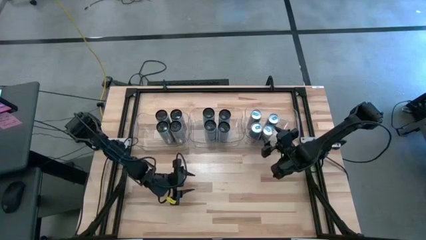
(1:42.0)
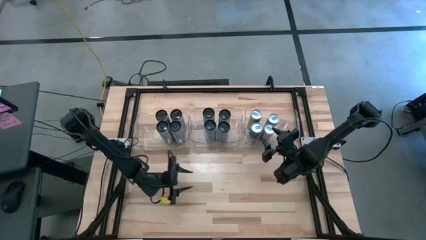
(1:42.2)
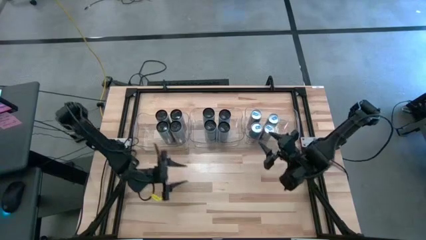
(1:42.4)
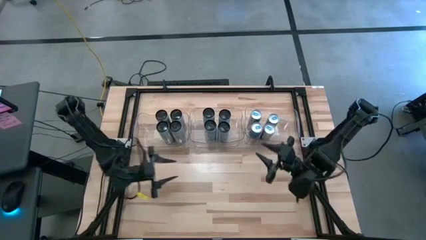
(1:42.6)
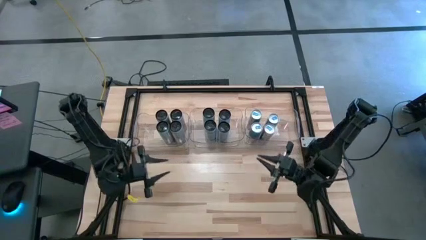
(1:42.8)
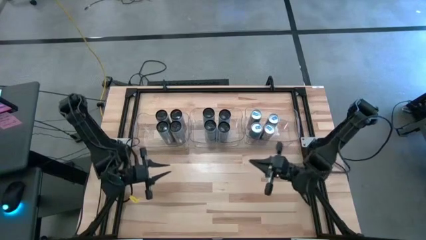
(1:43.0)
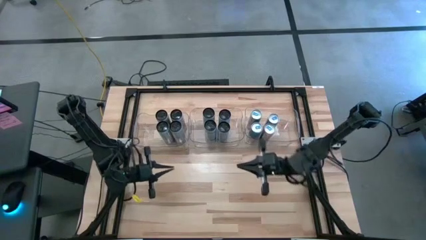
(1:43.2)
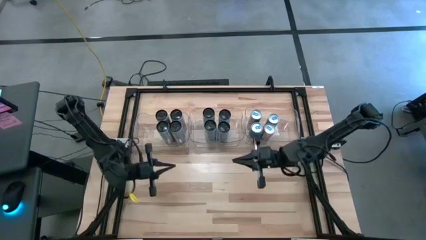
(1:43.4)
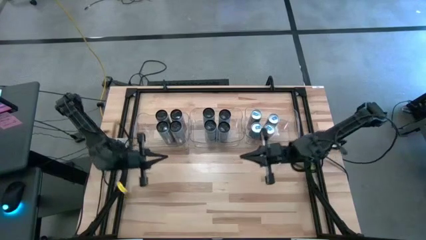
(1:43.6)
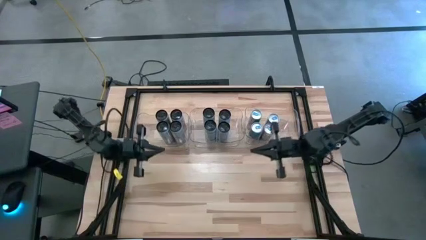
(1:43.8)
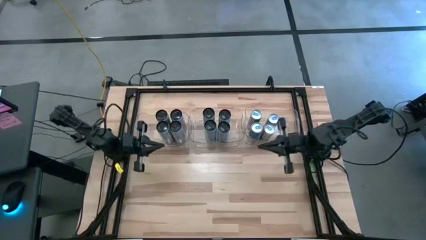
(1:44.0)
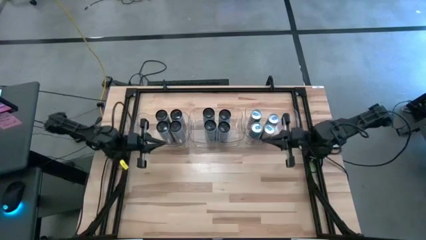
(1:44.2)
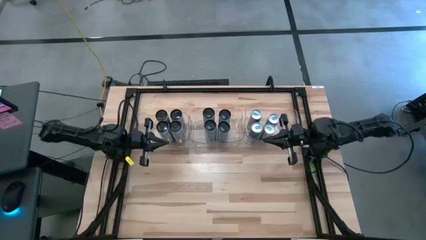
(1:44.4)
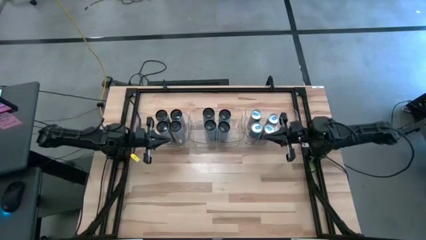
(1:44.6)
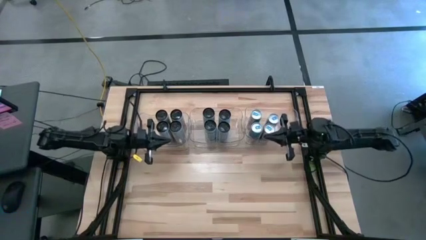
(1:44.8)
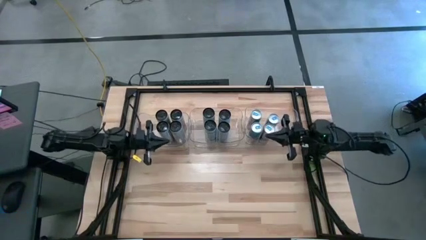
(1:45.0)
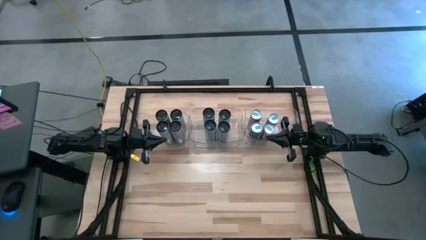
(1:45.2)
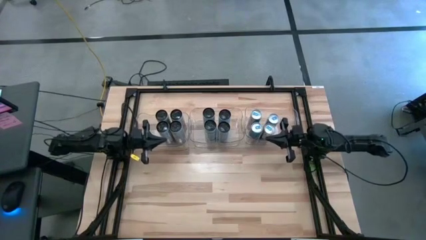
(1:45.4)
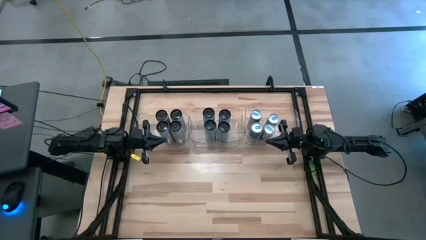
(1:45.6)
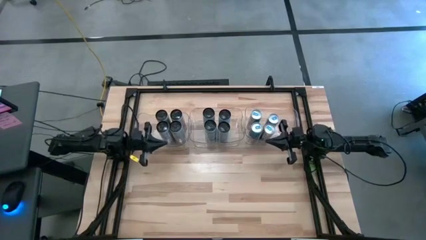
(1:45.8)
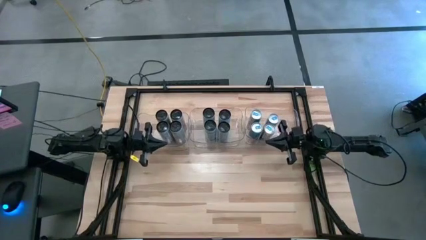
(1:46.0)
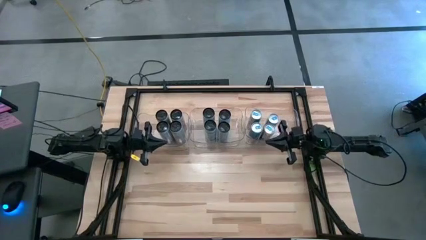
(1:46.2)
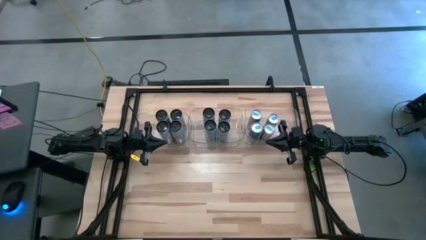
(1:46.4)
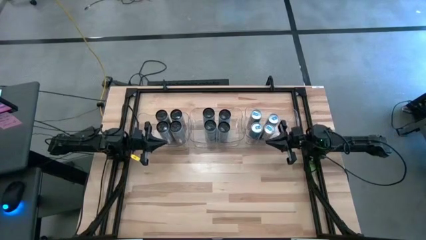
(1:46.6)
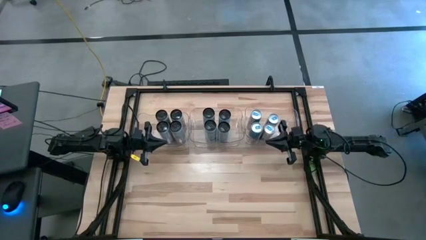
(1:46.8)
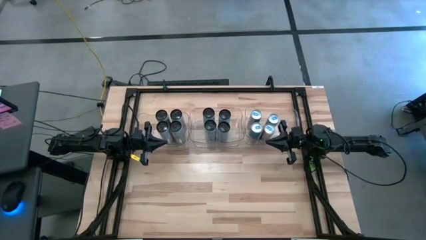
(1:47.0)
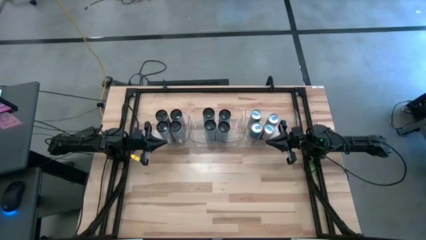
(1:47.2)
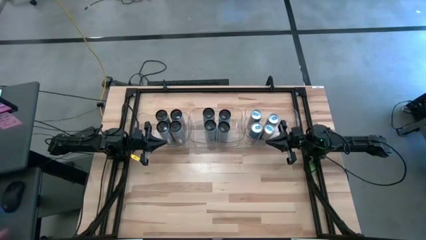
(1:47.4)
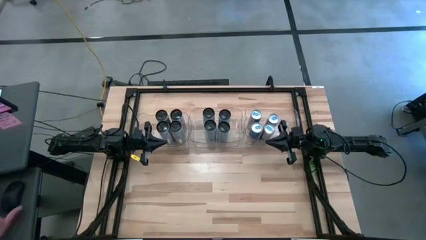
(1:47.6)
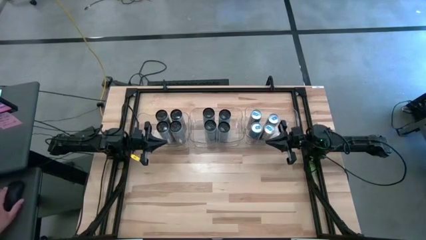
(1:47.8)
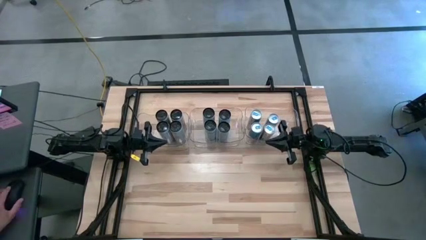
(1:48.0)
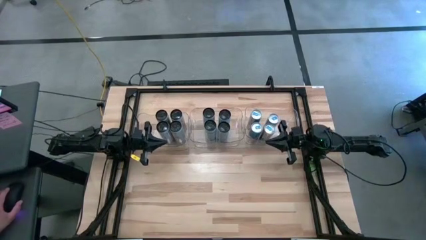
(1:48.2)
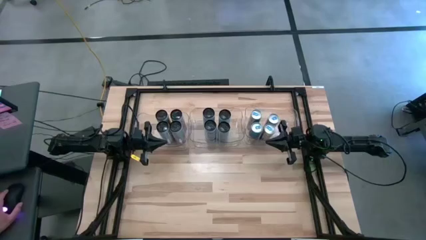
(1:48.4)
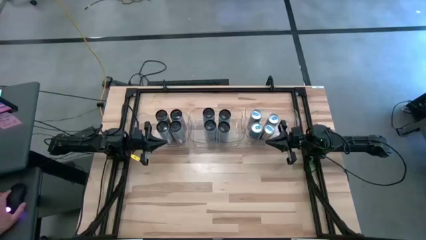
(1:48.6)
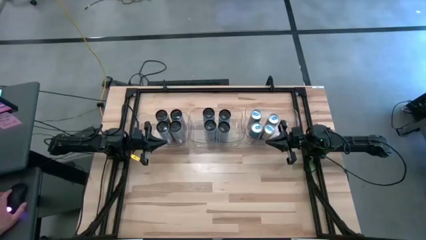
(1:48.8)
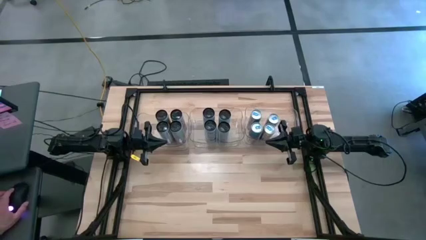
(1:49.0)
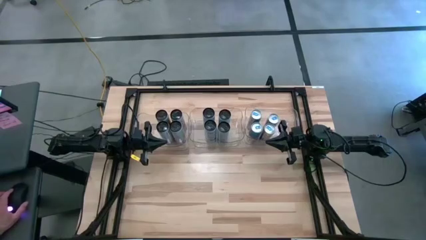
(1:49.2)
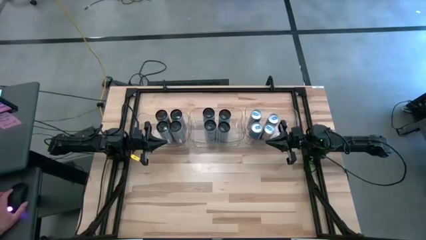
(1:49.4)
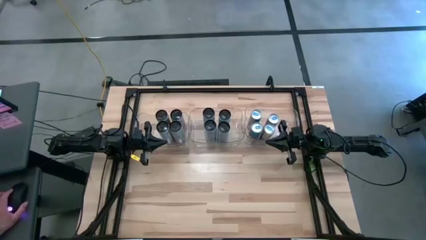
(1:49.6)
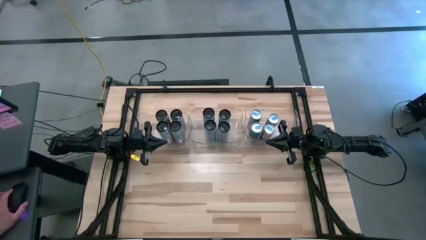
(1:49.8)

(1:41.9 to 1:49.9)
Task: Sort soda cans
Return to Home Position

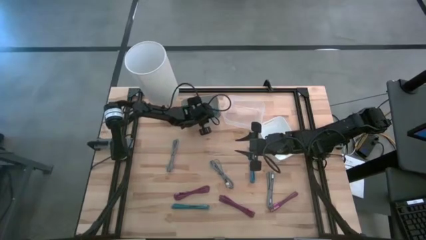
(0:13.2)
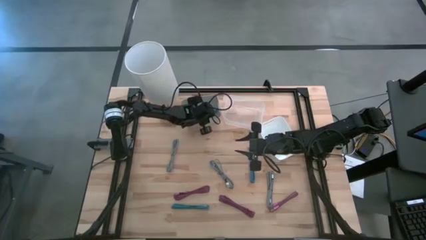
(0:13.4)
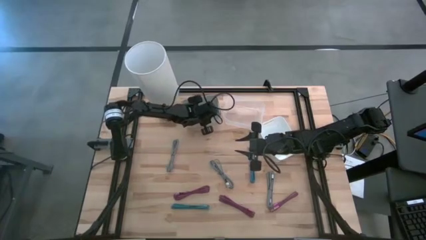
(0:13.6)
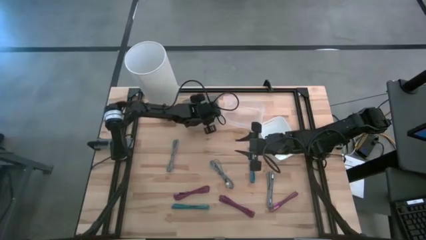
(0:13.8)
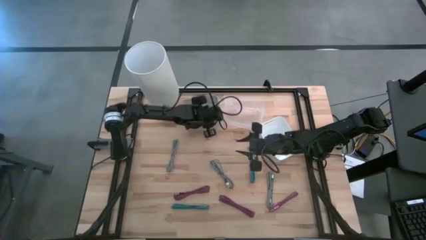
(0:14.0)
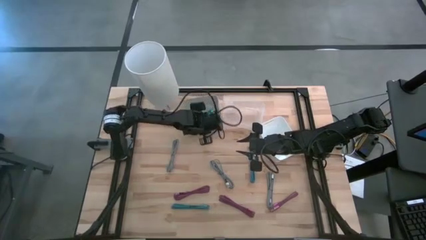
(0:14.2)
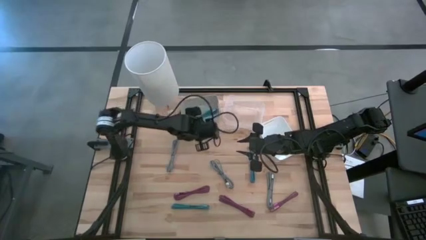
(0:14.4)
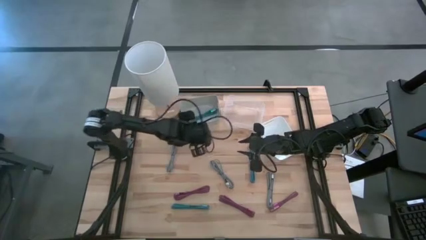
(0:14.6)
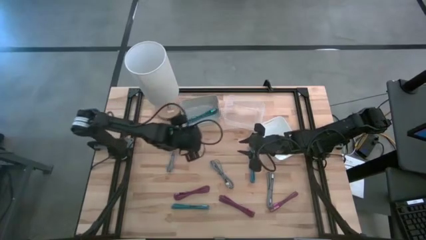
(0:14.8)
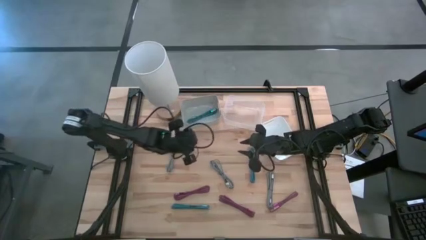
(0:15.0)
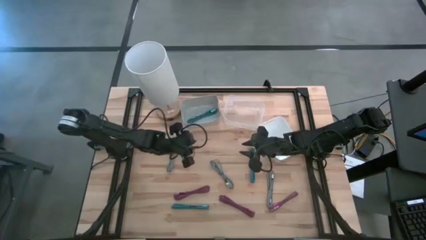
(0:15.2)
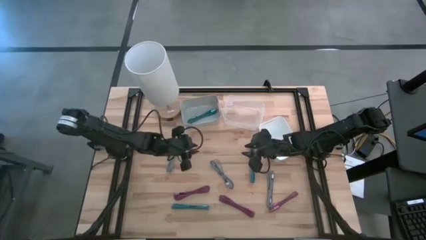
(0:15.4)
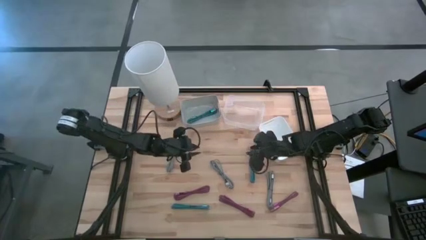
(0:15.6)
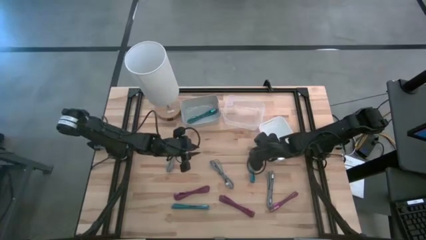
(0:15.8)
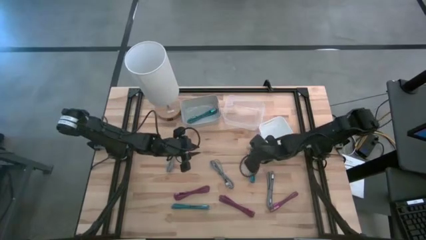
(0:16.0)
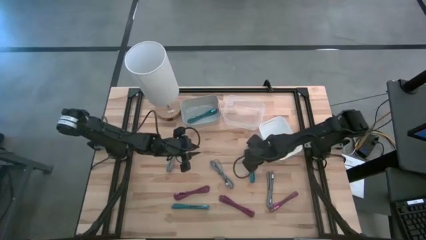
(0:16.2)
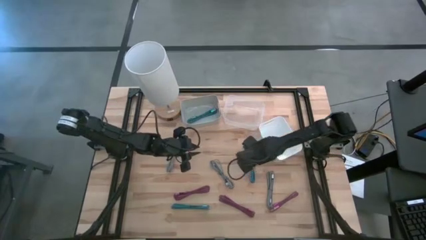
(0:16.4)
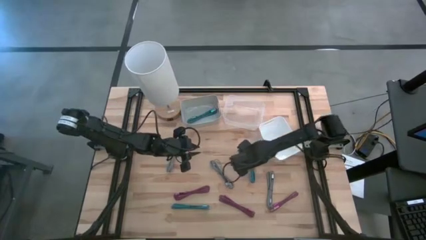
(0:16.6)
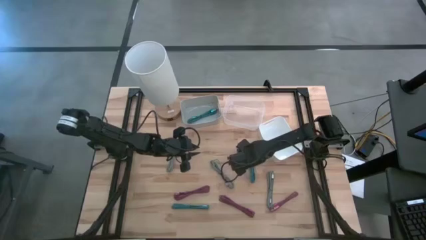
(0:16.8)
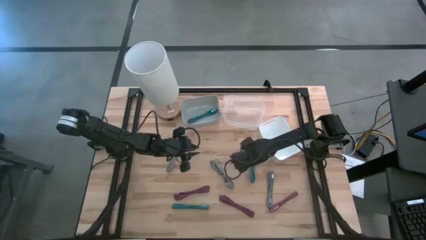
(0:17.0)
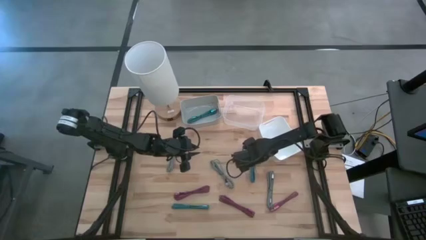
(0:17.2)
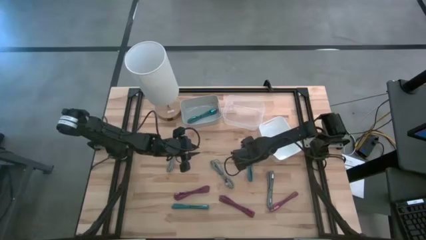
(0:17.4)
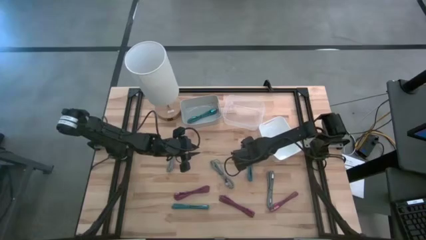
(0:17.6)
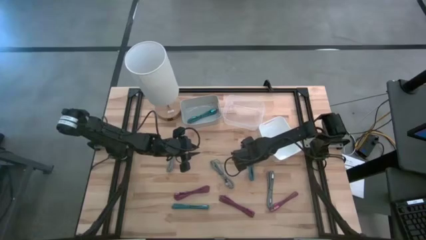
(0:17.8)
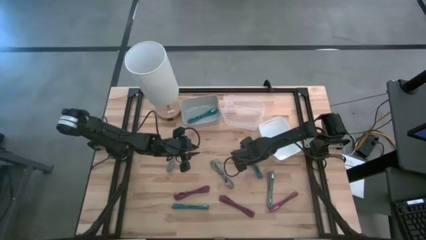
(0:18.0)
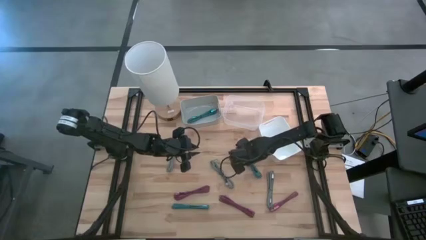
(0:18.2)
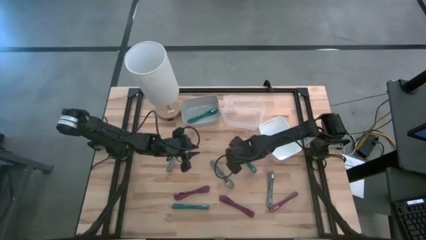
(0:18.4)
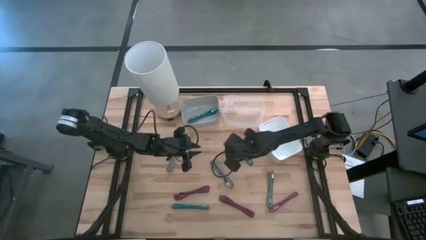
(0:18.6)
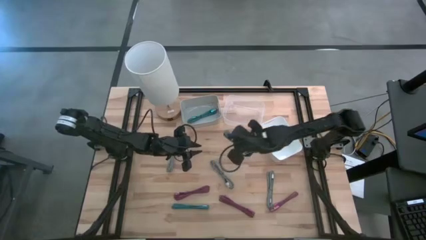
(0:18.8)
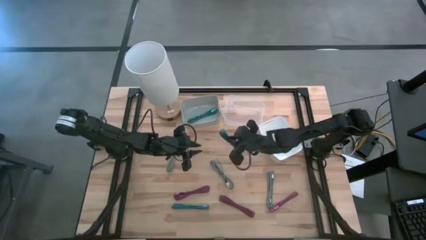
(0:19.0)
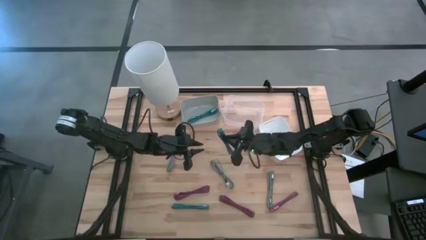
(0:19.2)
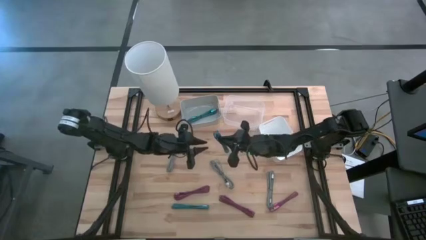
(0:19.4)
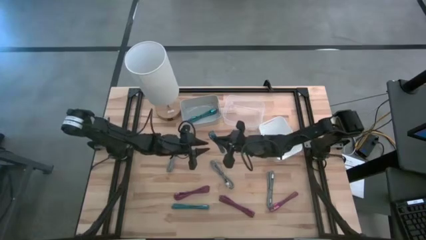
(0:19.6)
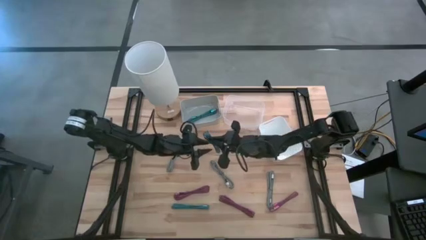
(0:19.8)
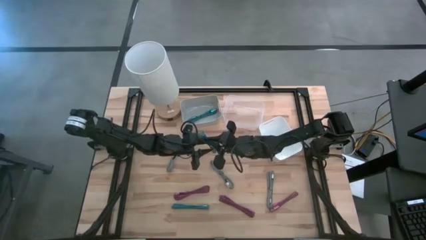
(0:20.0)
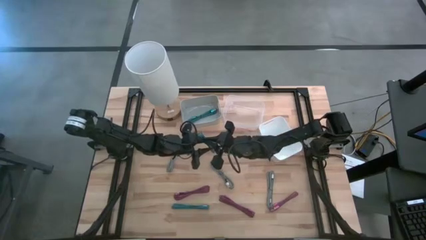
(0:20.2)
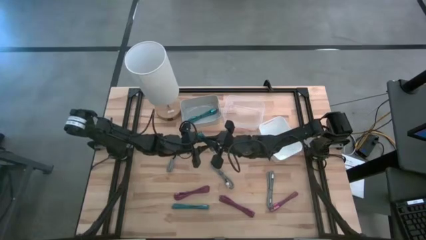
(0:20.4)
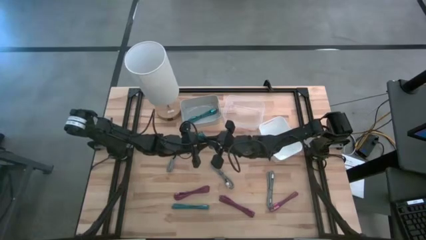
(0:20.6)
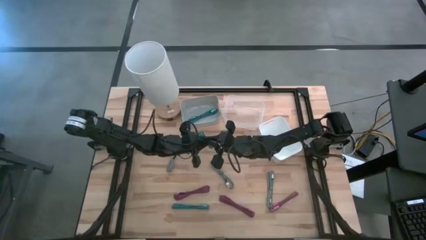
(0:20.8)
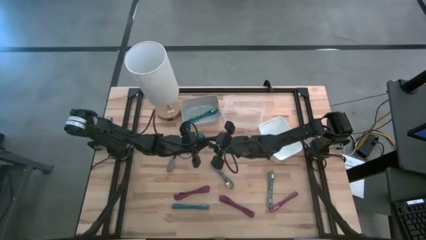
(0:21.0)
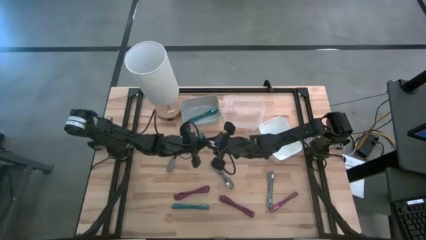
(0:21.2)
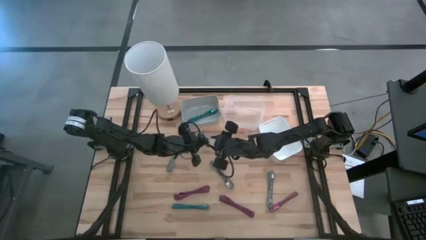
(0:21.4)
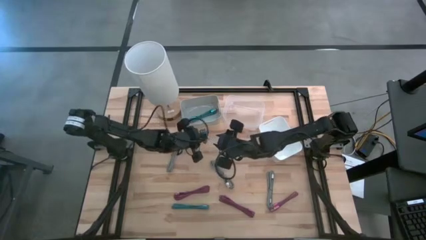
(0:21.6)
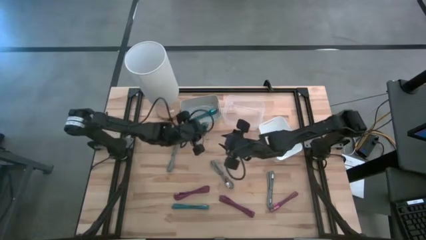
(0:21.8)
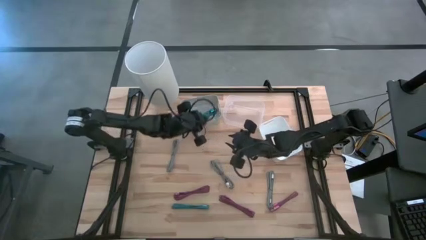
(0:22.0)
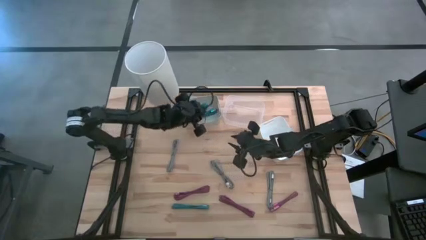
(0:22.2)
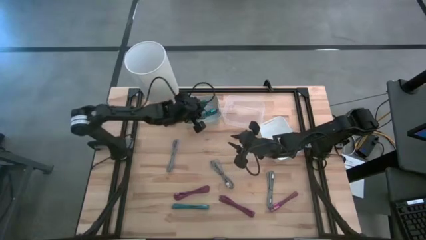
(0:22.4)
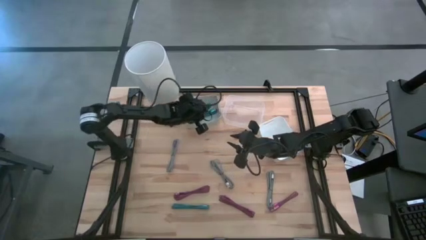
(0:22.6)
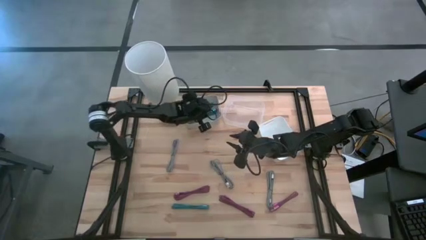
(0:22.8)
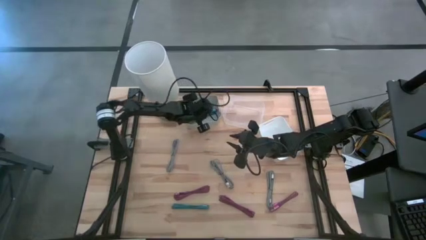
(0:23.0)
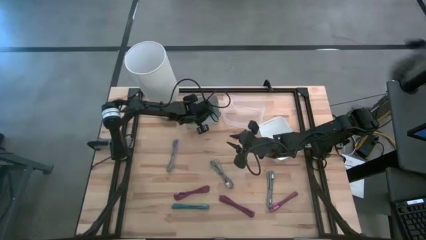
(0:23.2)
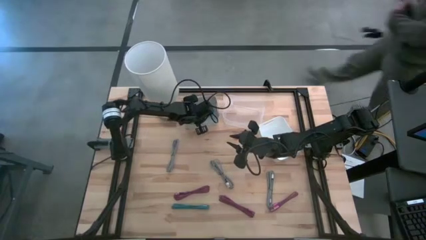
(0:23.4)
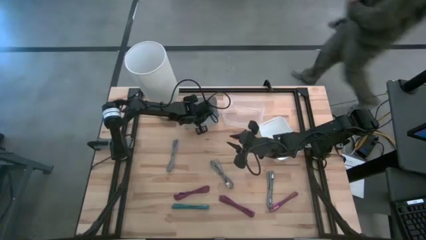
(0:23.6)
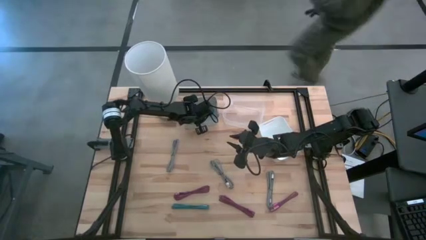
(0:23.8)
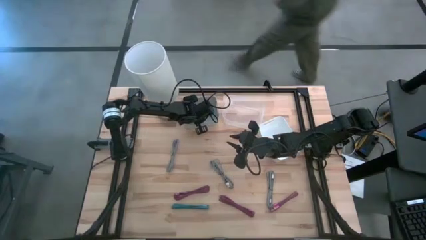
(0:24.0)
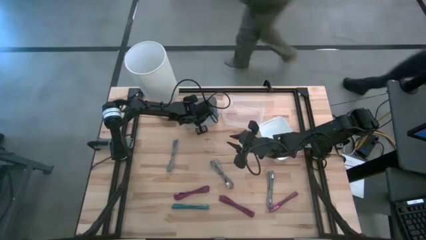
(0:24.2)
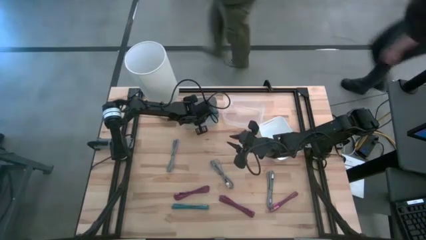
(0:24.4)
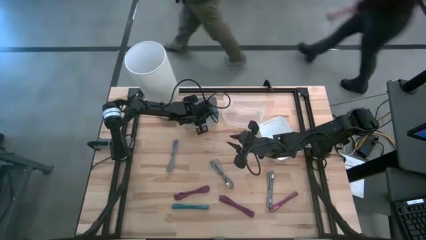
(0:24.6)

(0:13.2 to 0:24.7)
Task: Pick & Place USB Port
Put the right blue and black USB cable into the gray bin
